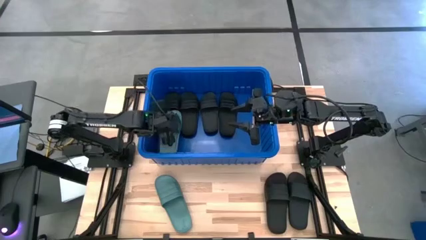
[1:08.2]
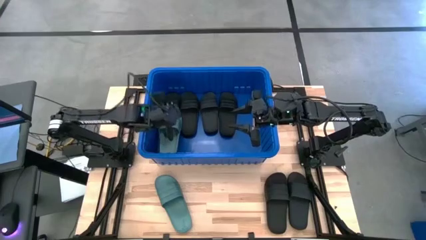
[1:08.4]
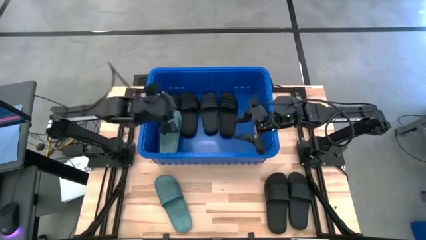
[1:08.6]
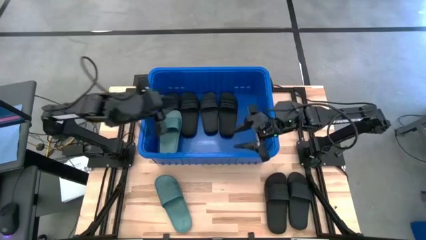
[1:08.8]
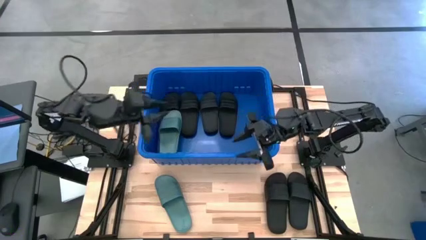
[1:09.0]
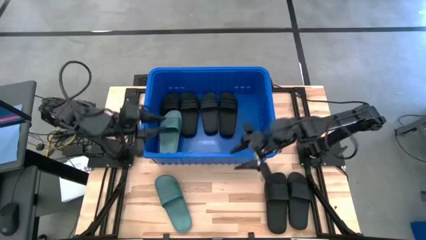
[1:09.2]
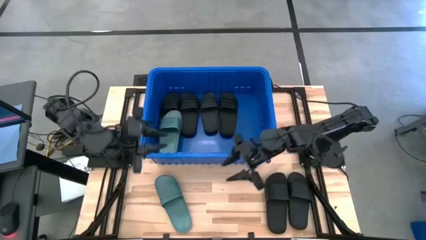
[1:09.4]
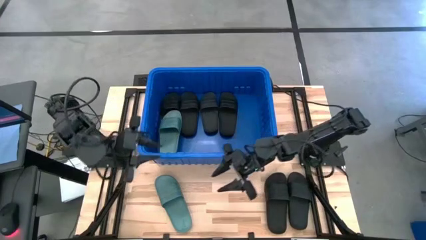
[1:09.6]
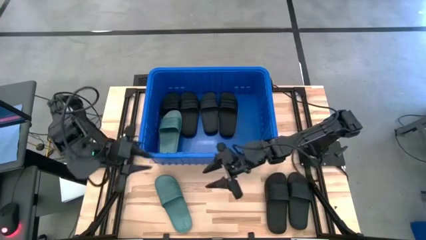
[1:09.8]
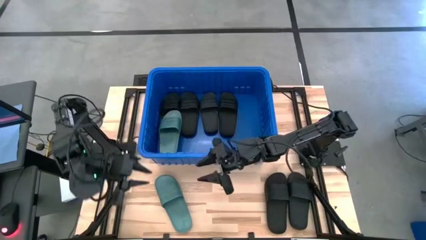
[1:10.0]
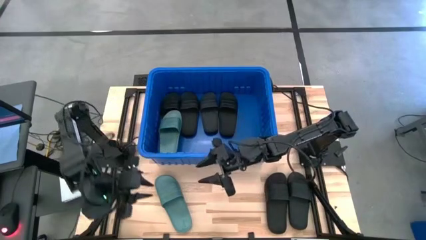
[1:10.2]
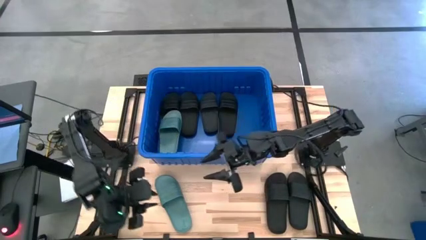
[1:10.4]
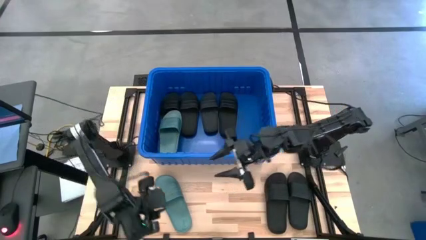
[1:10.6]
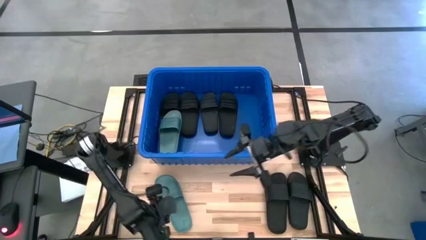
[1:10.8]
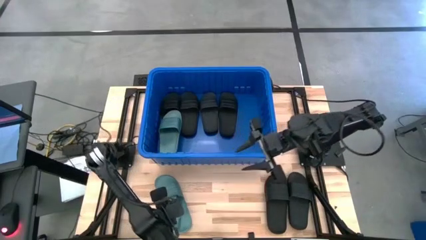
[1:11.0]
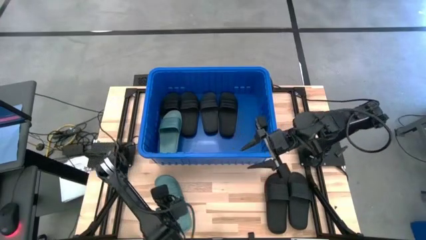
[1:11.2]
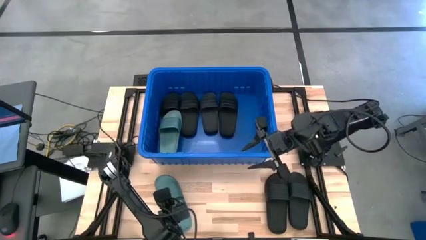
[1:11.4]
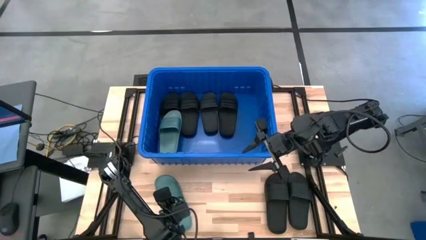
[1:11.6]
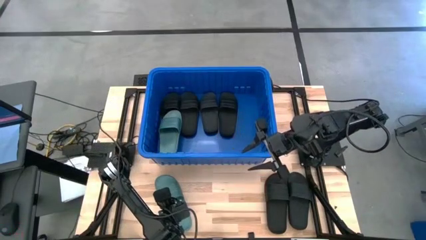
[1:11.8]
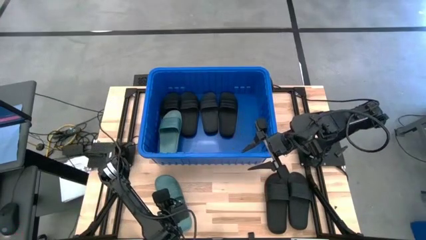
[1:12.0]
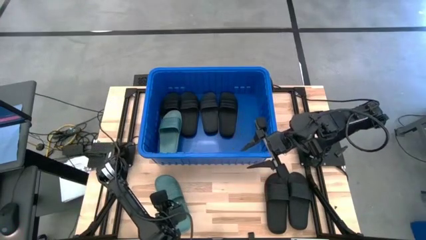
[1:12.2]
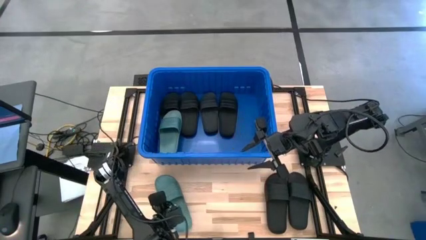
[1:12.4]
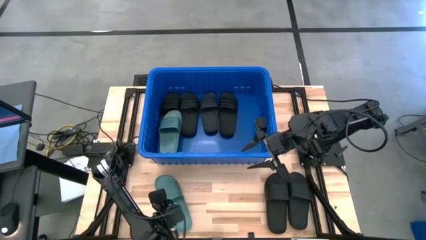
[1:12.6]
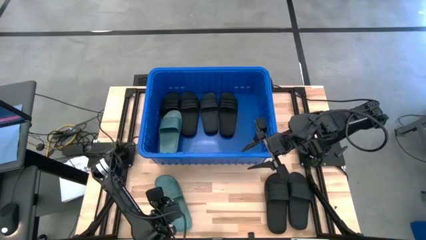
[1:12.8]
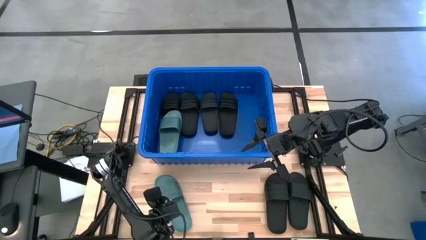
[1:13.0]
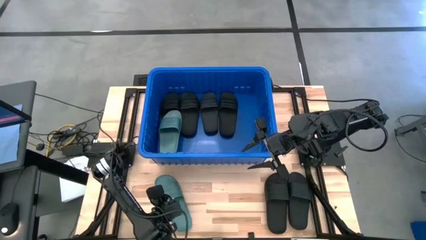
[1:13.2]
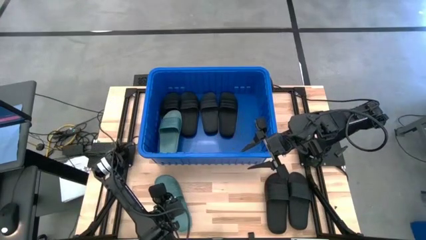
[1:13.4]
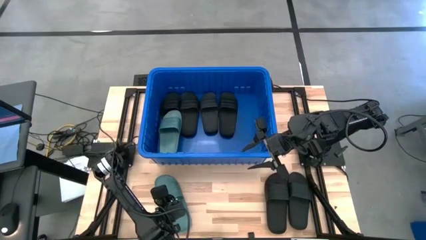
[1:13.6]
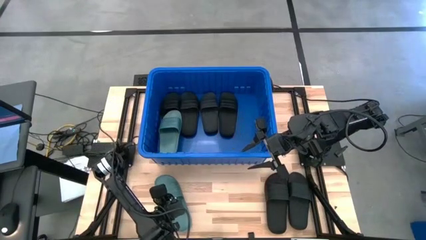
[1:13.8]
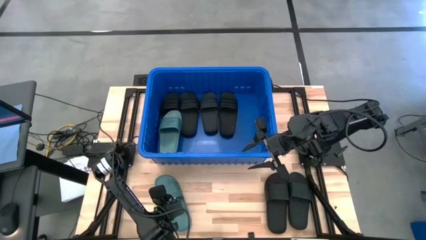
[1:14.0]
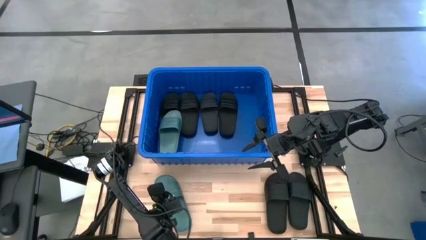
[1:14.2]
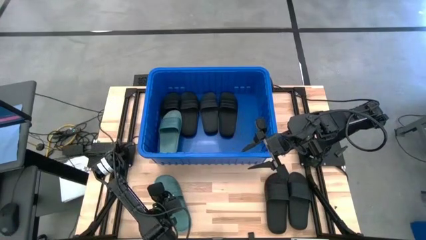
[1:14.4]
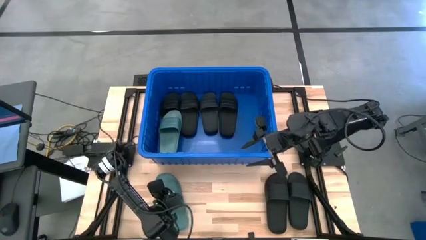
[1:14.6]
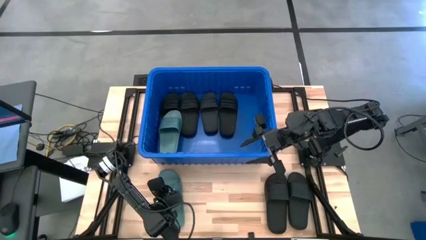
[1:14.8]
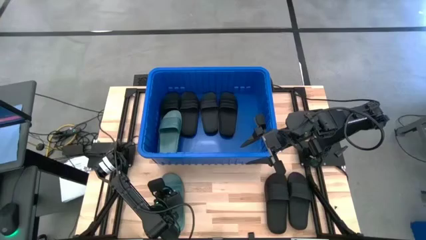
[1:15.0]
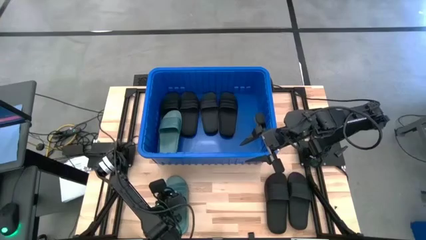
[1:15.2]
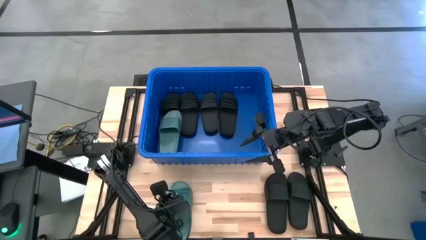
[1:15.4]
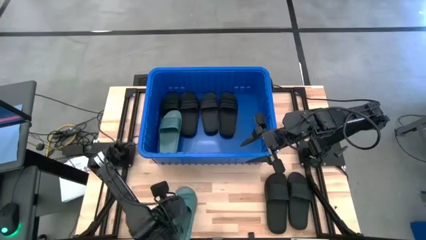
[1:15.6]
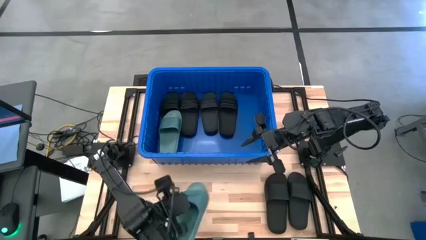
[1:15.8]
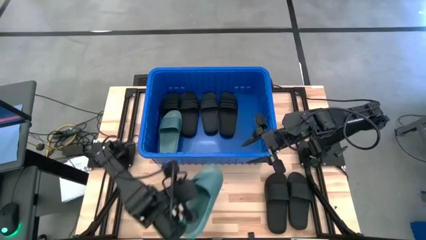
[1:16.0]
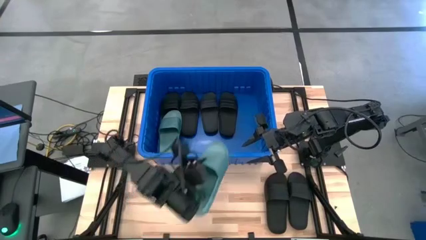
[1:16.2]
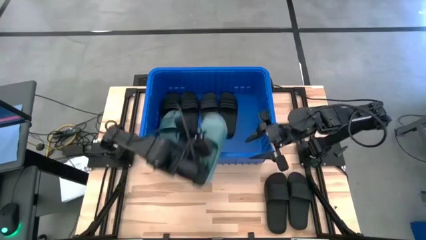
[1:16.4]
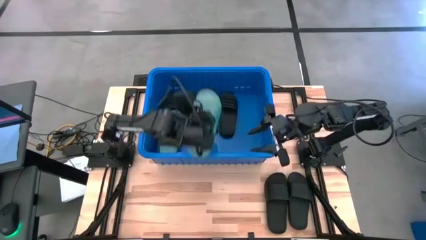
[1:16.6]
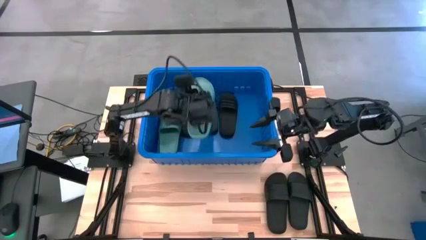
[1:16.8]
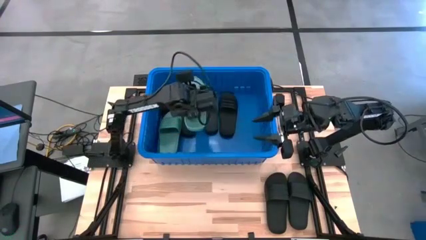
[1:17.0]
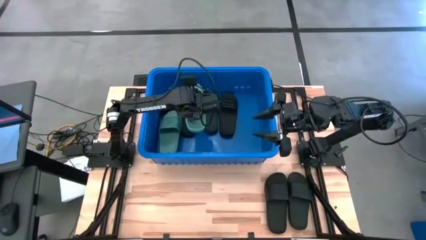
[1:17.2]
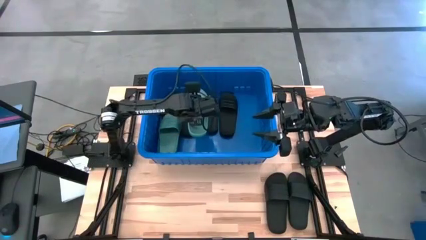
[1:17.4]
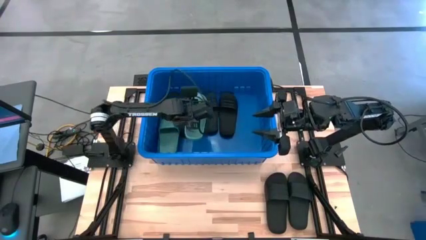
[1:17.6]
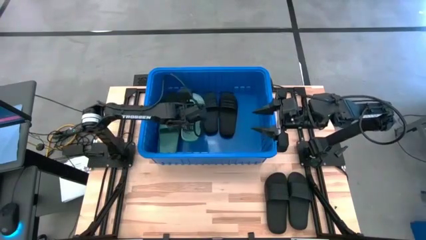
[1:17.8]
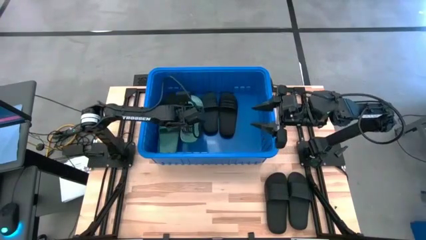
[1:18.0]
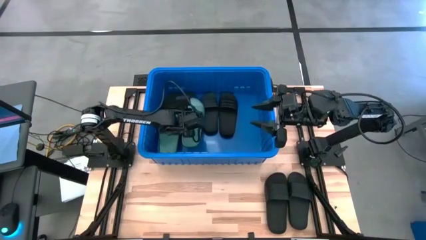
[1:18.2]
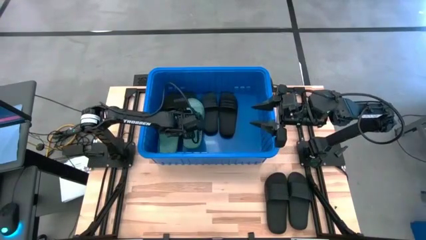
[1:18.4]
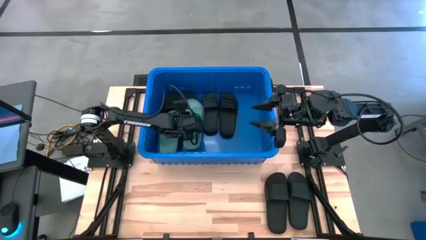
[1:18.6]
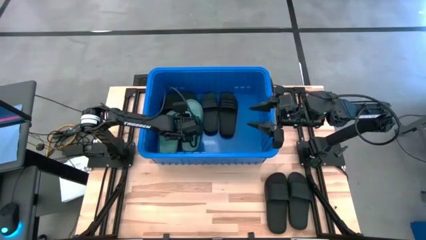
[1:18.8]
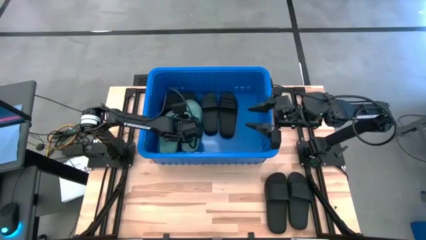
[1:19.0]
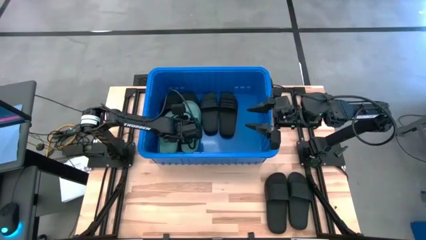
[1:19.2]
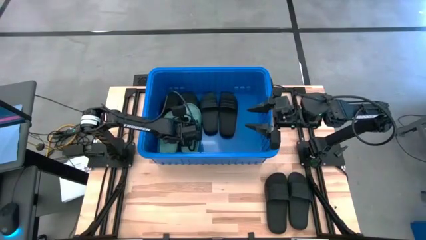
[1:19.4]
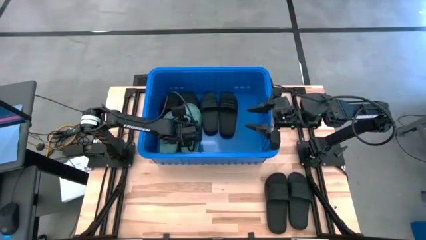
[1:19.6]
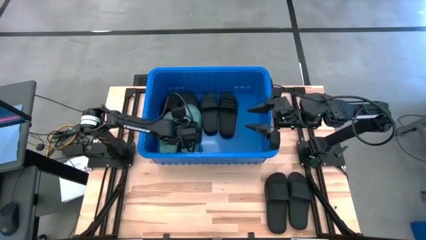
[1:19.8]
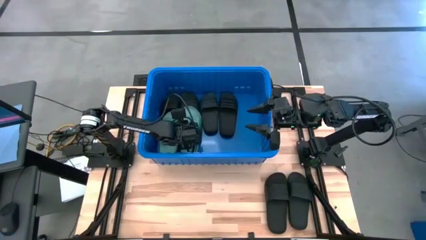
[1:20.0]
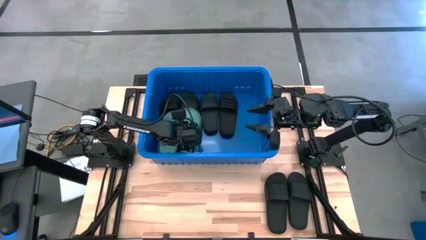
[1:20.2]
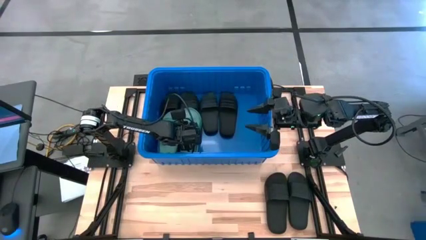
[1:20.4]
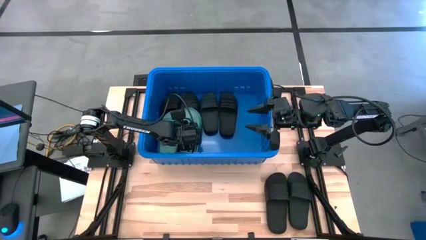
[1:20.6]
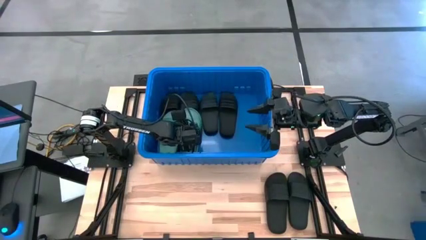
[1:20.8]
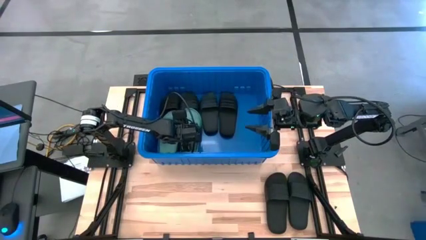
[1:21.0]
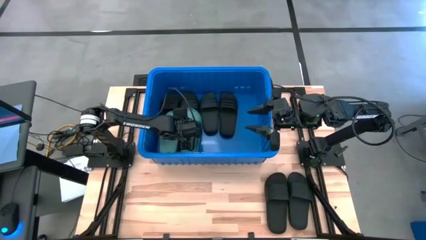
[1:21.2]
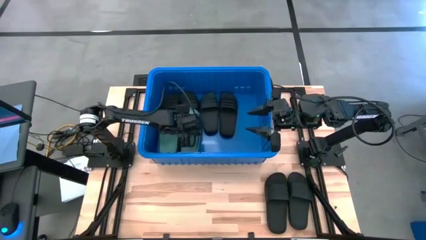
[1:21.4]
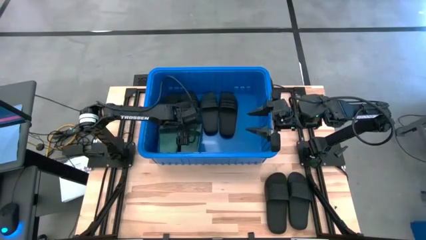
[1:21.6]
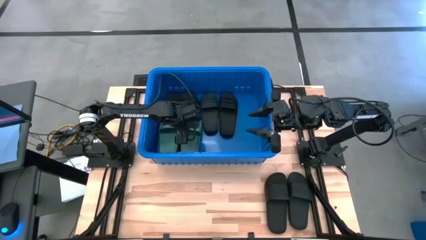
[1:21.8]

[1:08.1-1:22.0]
Task: Pick and place slides into bin
Put the green slide into the blue bin

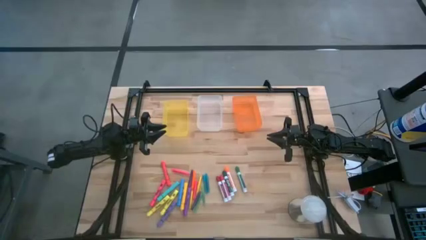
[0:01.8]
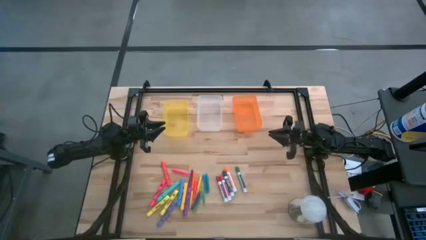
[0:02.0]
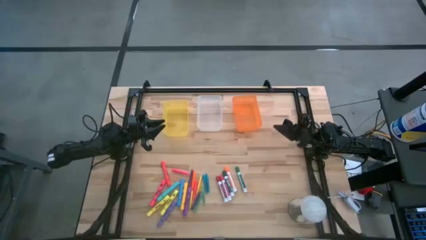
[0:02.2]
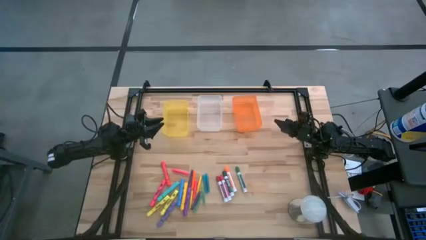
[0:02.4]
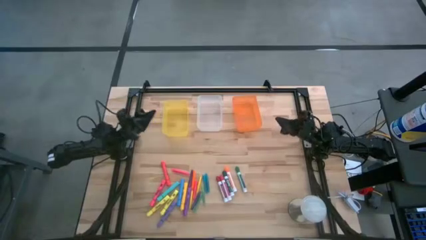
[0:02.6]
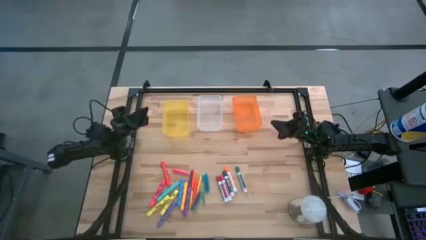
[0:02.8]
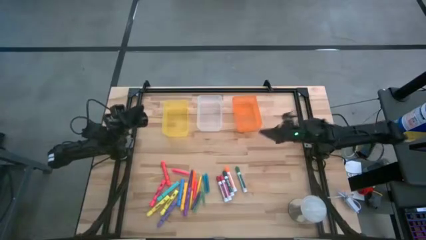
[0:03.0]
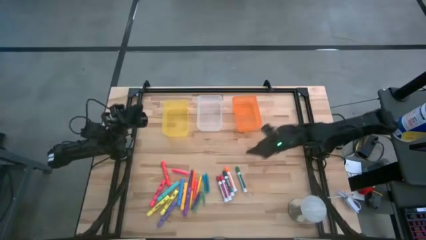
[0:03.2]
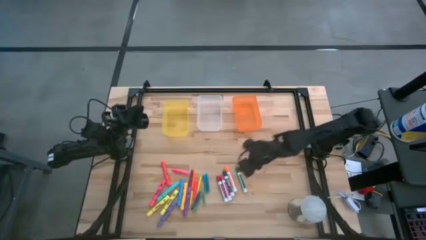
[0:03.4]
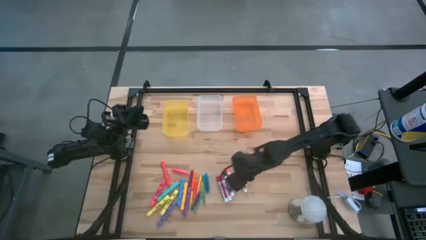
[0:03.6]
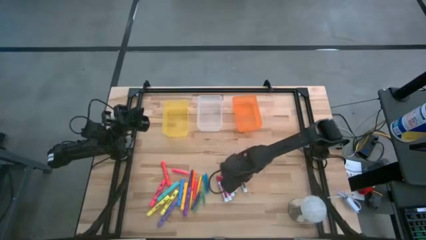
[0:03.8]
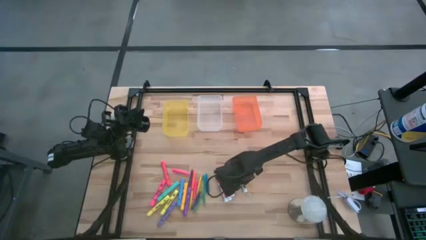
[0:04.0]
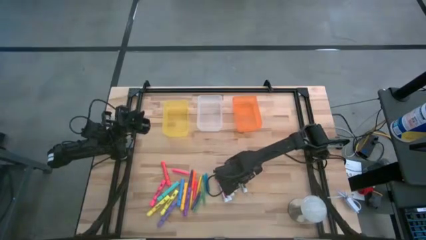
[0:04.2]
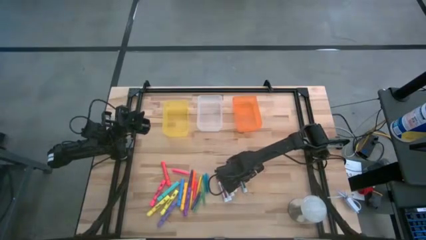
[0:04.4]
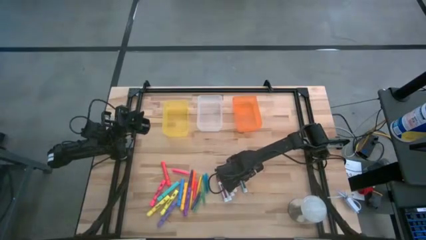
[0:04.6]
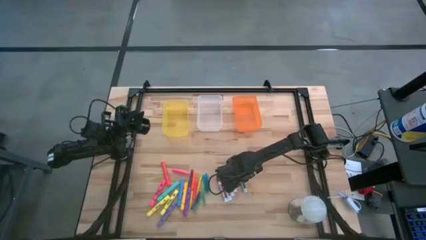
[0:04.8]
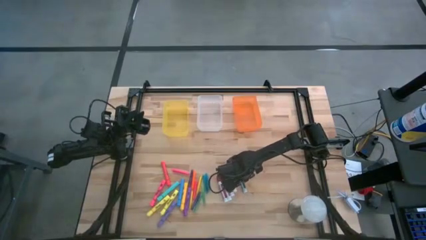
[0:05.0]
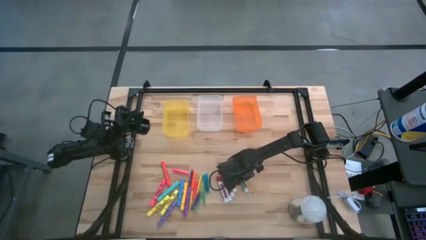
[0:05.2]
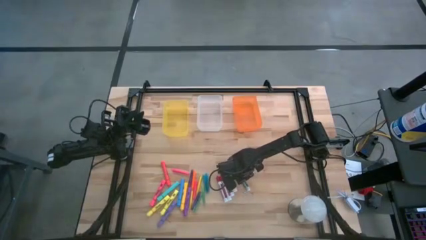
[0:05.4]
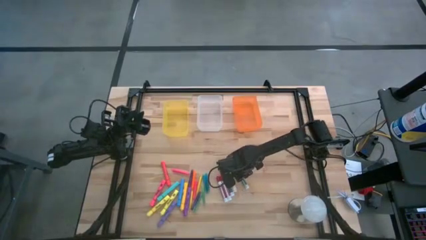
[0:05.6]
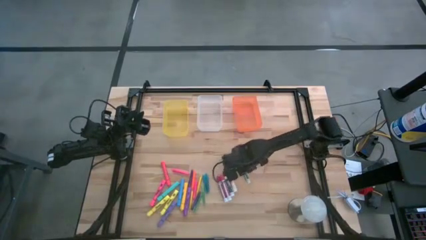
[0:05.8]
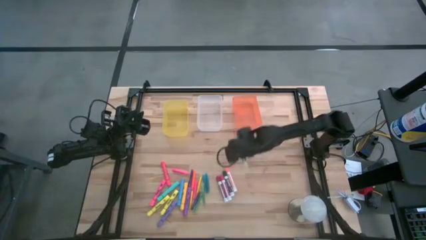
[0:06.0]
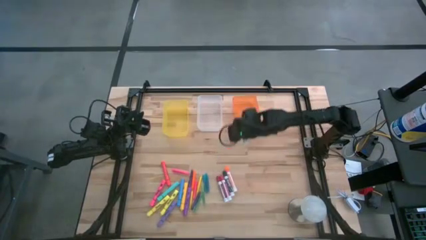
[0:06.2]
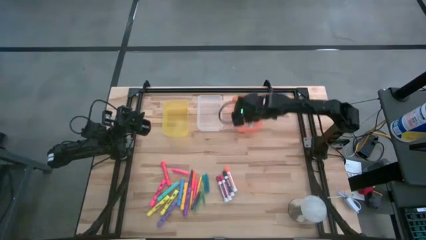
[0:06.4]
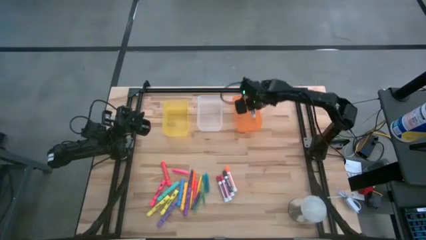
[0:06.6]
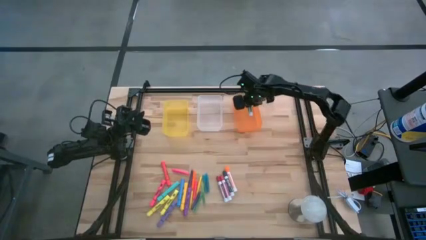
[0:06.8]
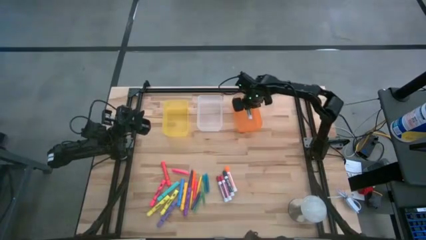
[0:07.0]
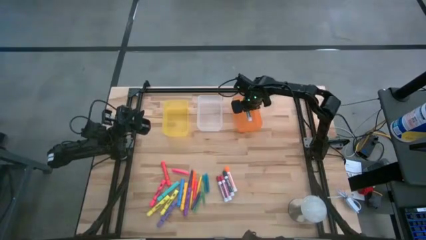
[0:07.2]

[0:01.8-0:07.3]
Task: Pick & Place Markers
Put the green marker pen into the orange bin
